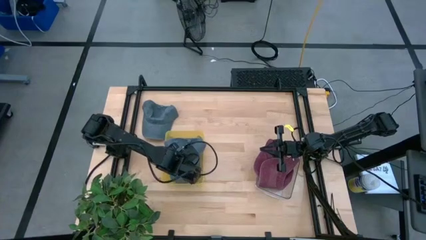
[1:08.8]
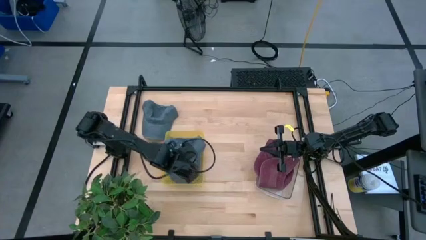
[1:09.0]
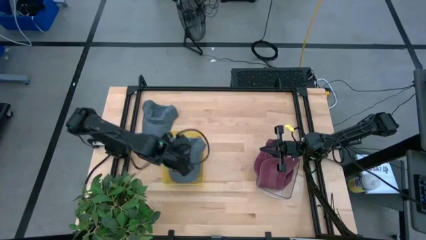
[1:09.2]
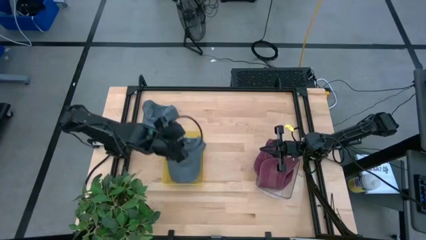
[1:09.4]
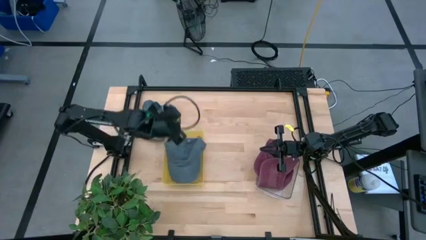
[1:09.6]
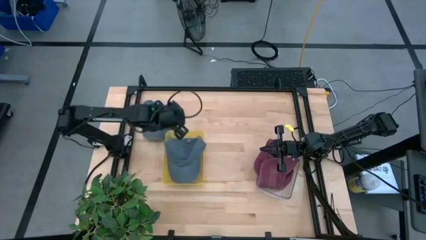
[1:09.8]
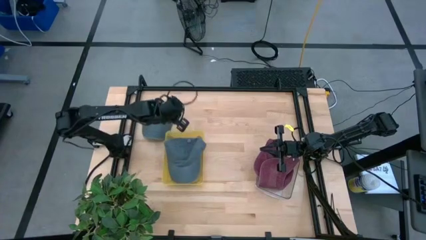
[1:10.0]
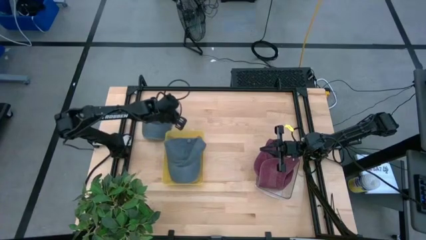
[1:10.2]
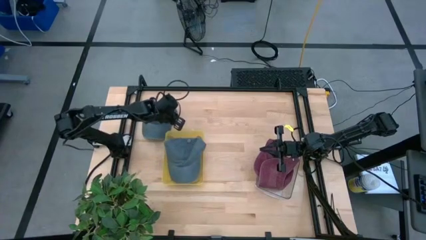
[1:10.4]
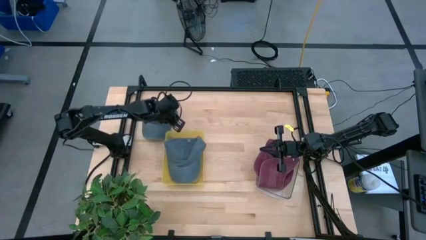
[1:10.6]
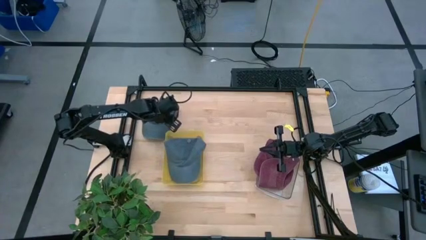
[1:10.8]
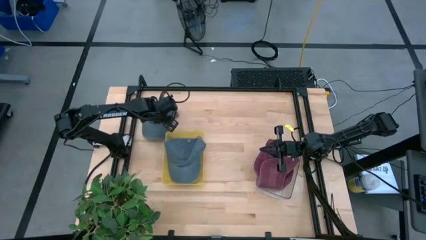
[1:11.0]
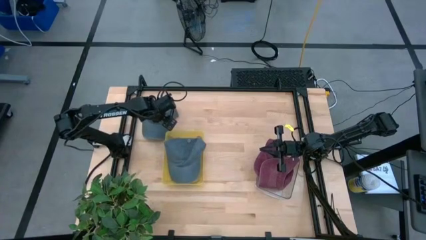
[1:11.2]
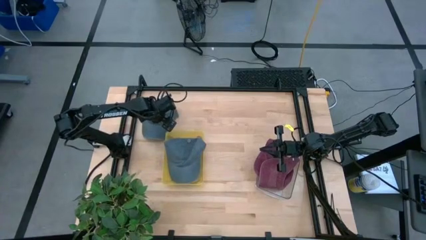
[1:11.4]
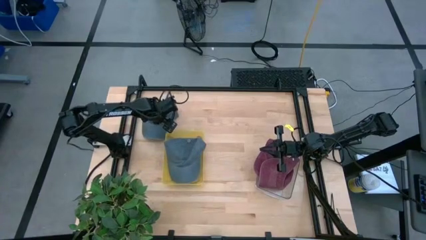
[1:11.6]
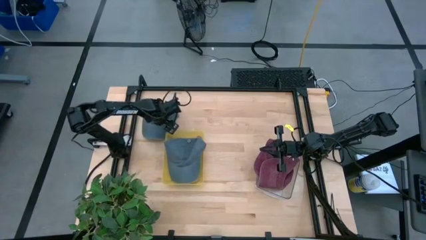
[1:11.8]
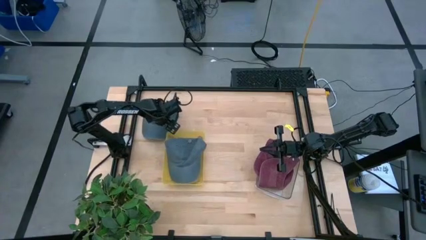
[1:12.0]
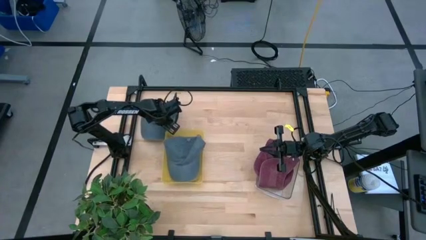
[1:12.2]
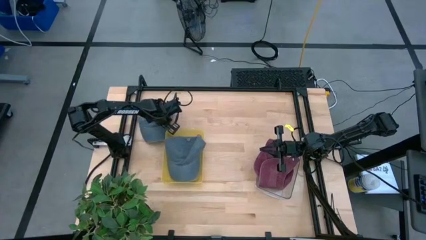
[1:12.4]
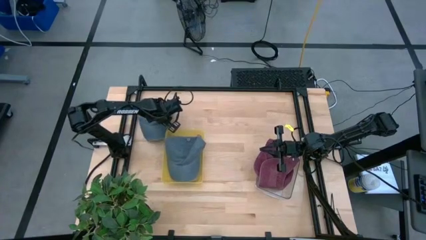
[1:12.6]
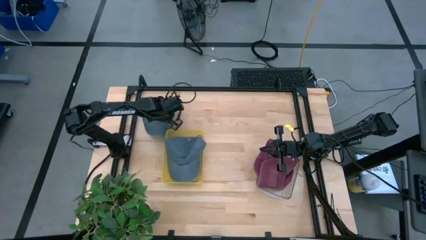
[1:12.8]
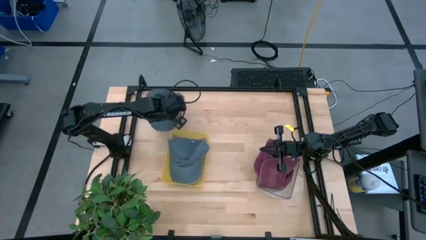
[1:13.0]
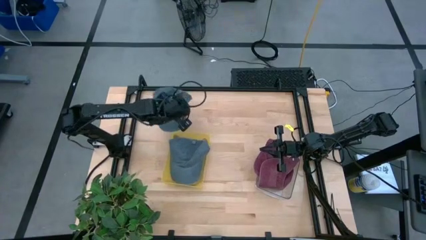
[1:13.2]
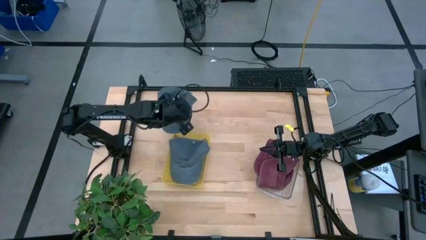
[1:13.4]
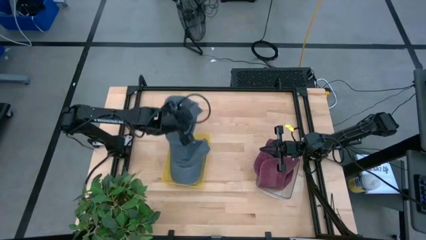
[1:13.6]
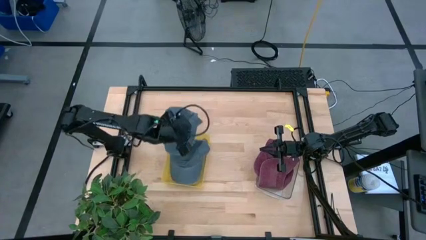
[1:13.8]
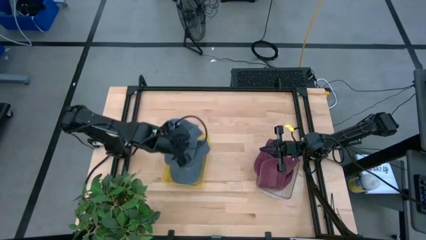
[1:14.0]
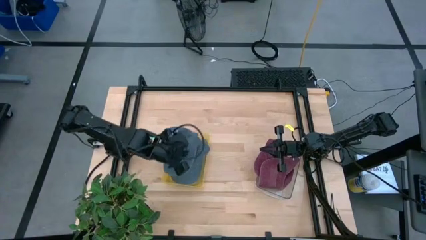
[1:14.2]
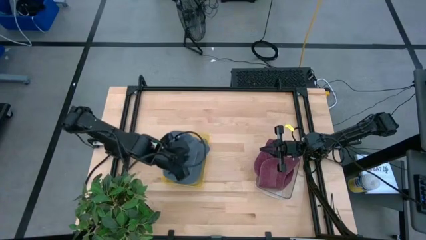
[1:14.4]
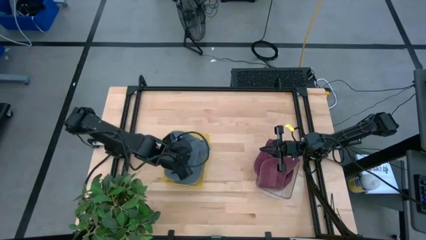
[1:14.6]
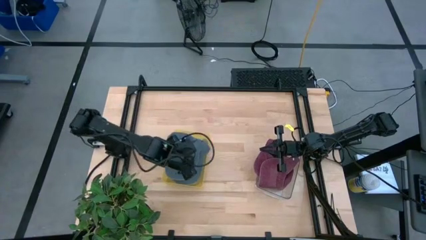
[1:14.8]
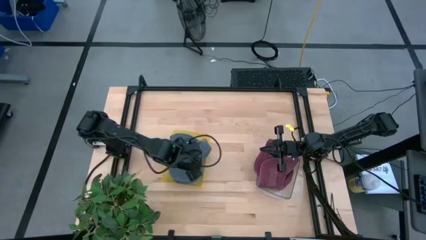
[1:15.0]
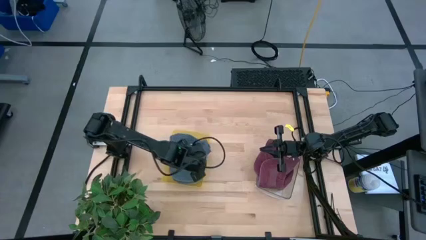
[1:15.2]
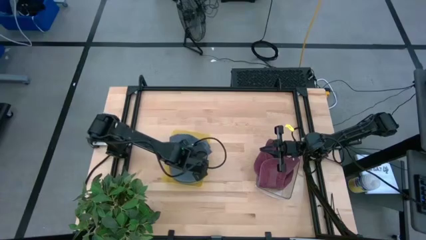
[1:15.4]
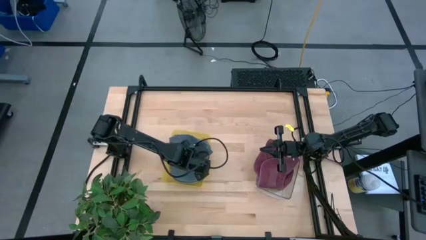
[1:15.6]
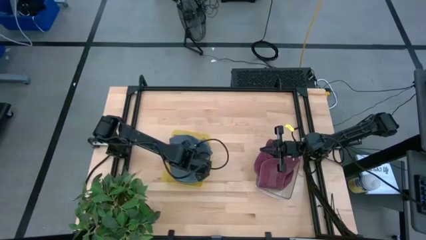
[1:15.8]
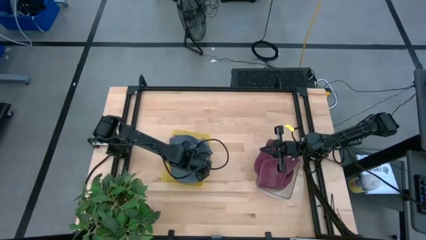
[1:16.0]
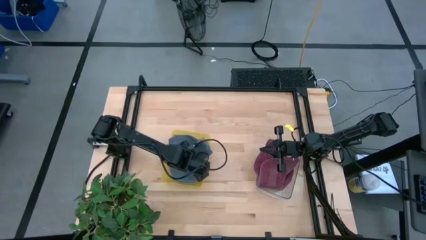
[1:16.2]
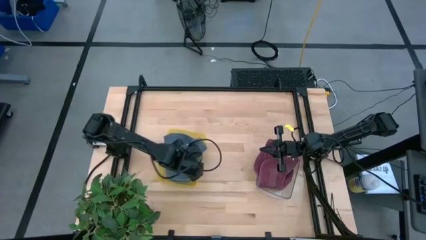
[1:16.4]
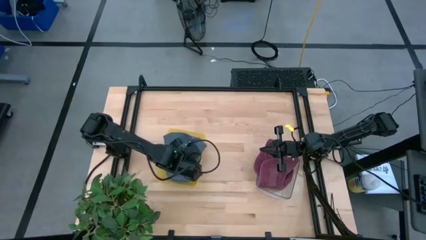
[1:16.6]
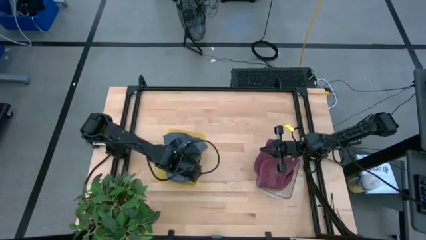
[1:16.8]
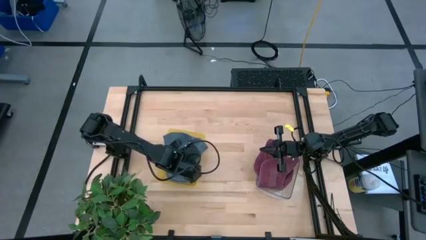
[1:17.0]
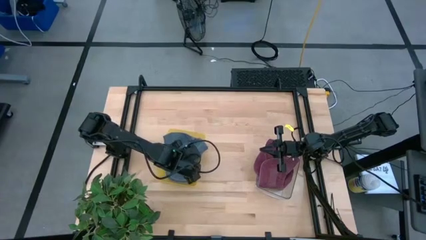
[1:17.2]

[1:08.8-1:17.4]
Task: Pick & Place hat
Put the blue cap into the yellow bin

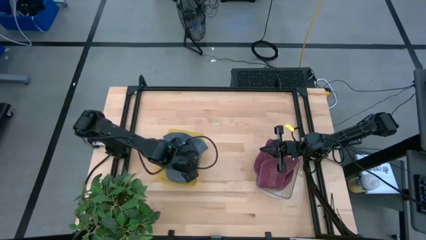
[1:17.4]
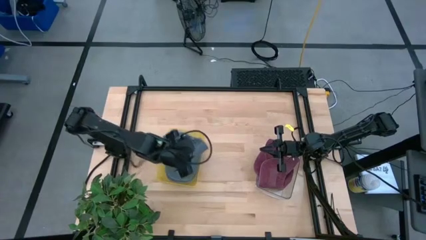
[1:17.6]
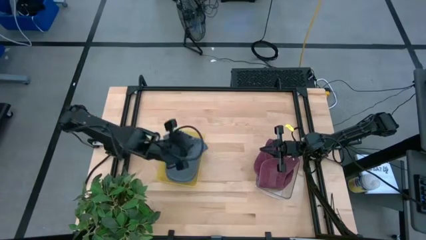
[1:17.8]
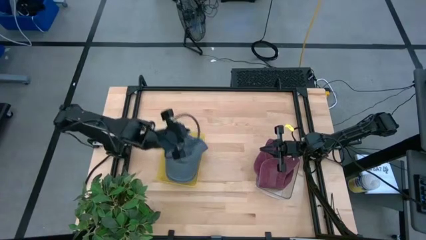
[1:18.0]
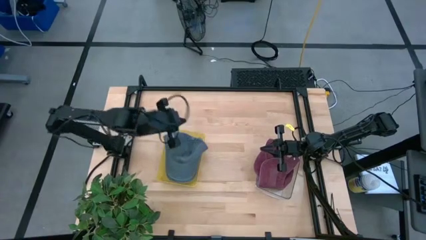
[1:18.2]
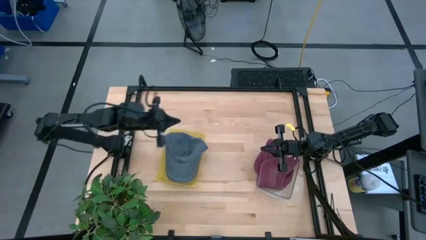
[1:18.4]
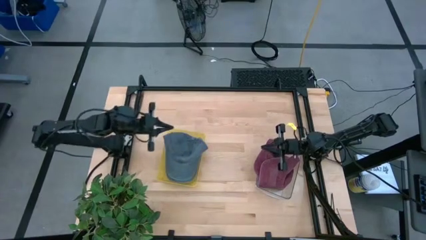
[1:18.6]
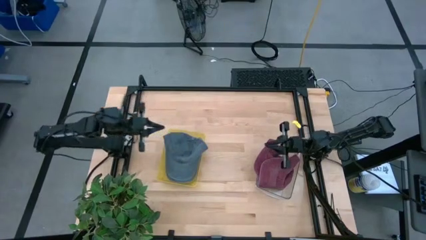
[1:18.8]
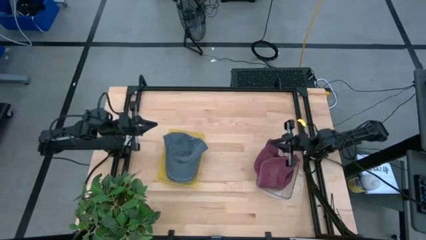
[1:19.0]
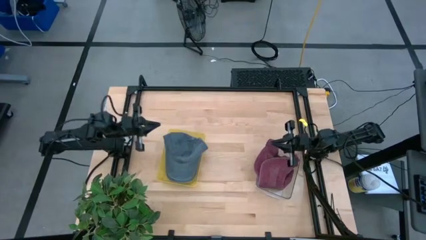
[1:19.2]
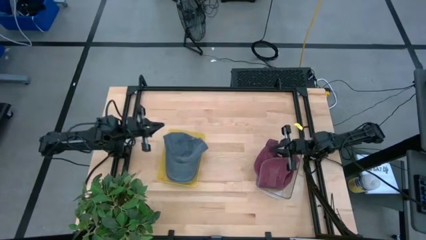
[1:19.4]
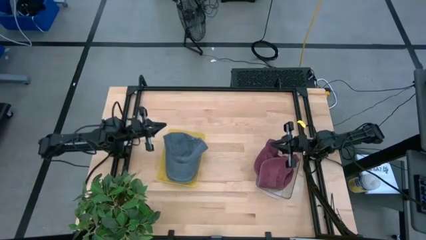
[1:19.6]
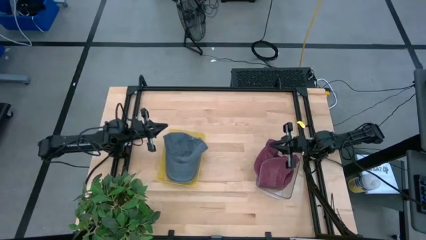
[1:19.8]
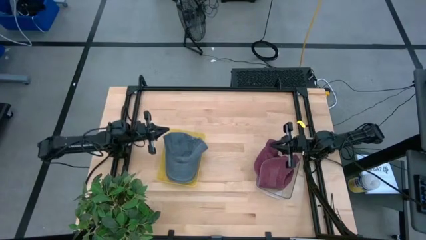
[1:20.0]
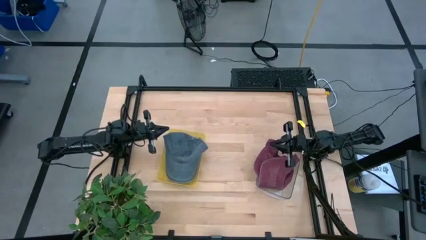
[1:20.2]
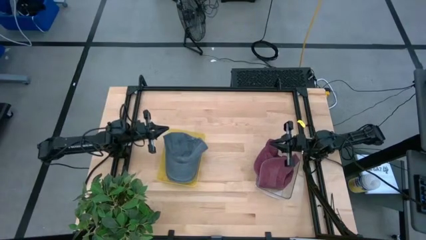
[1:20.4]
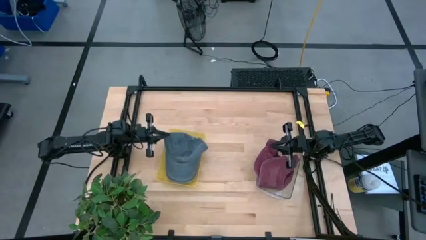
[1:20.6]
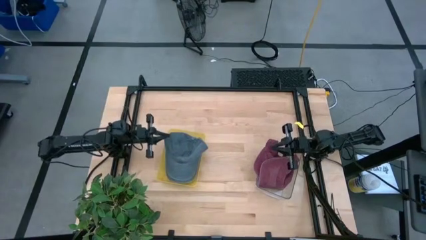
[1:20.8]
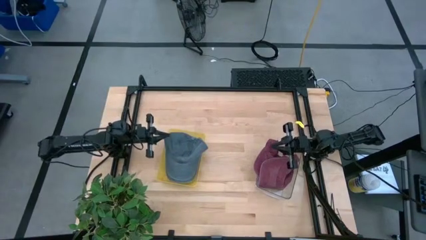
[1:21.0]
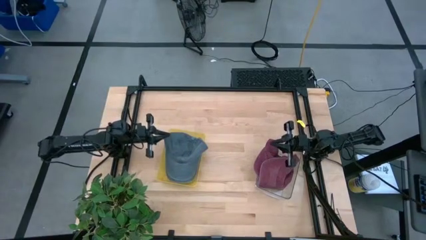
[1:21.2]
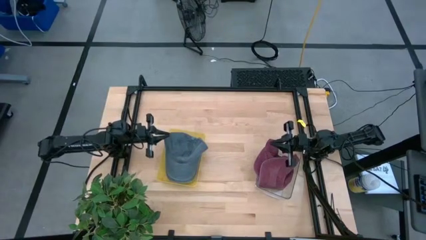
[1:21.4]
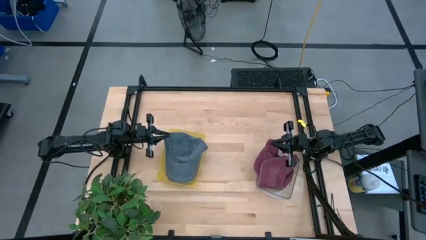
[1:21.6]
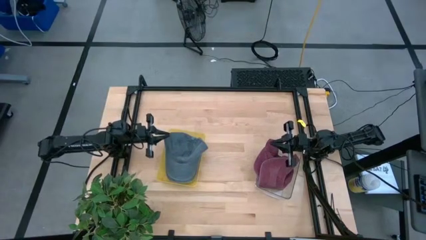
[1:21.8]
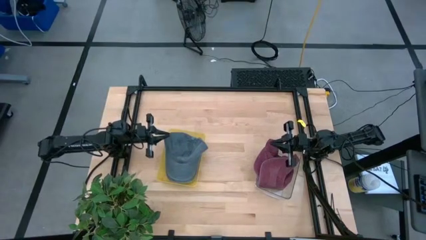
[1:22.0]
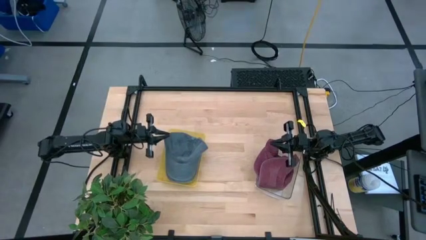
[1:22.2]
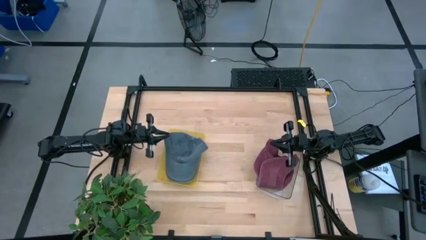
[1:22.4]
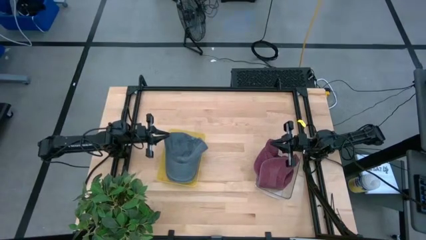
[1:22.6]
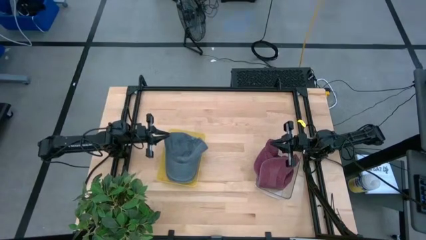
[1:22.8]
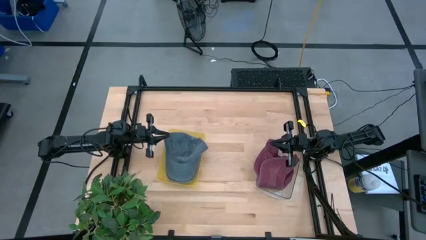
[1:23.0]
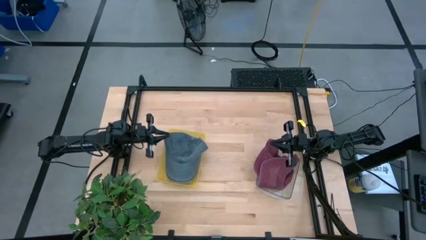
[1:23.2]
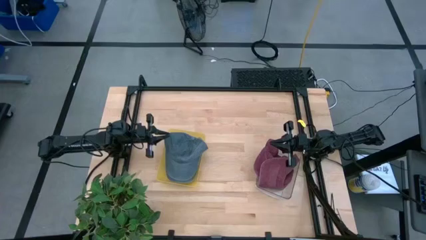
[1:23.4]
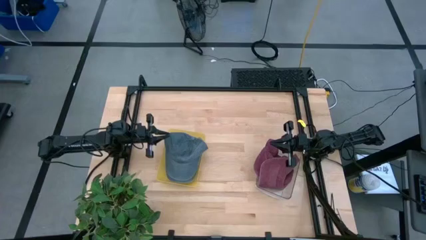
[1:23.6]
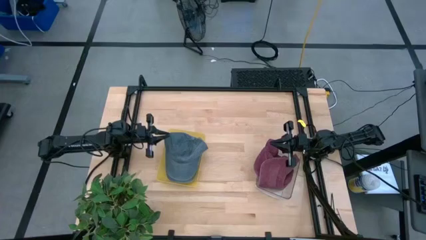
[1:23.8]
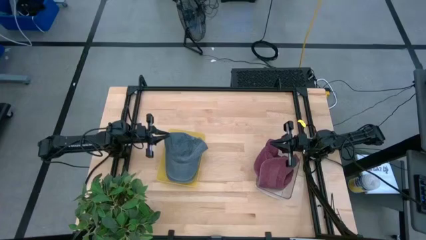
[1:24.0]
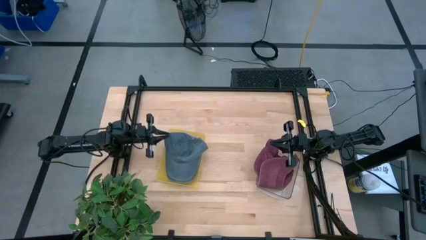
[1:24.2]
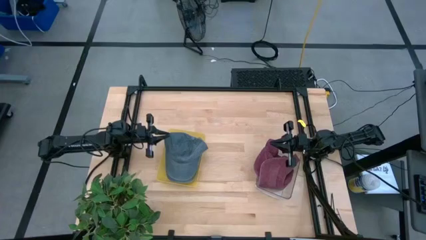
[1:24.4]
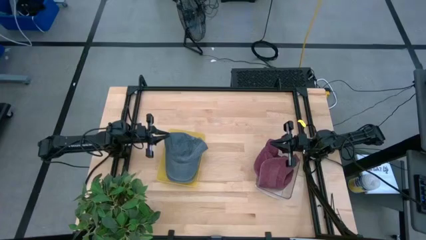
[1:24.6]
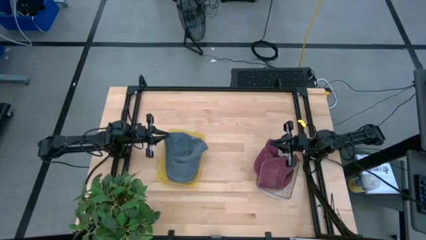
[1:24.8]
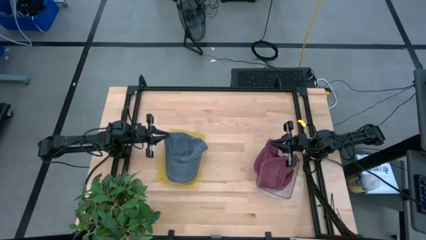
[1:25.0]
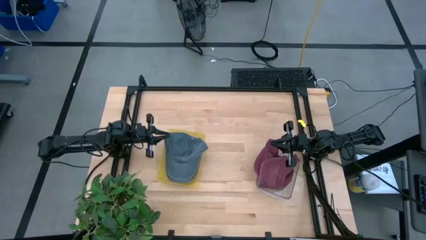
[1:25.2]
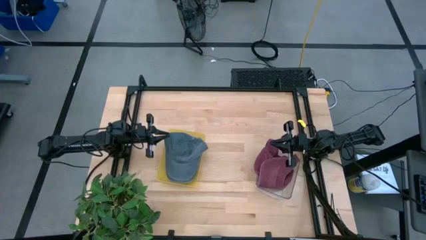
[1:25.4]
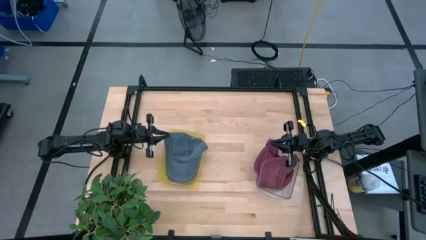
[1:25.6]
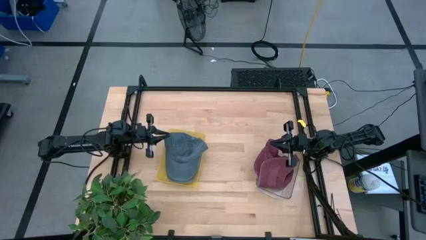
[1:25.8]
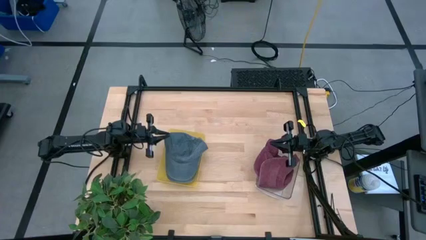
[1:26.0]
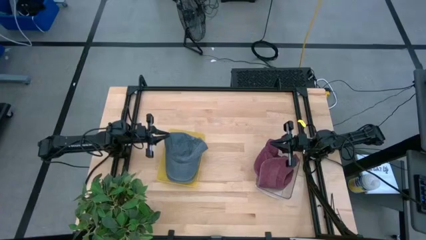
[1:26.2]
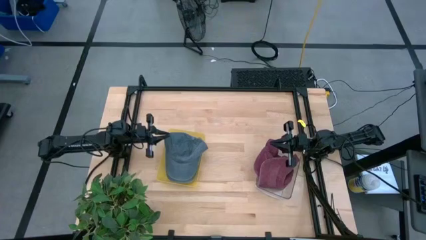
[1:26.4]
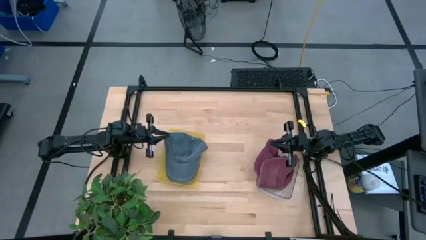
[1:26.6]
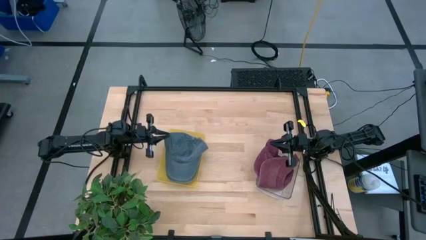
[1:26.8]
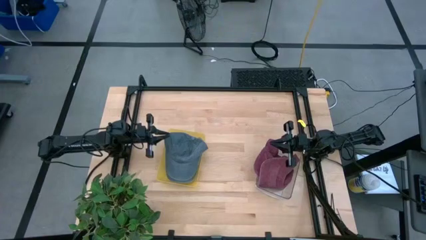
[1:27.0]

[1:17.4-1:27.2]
Return to Home Position
